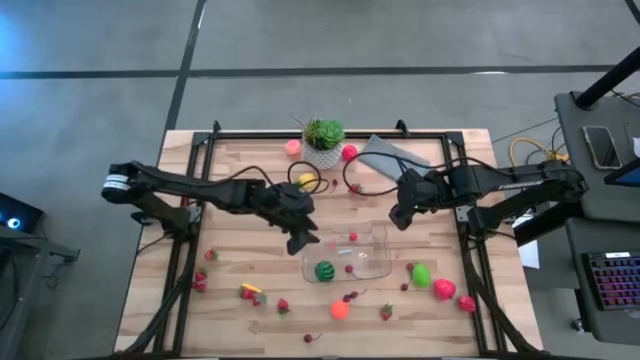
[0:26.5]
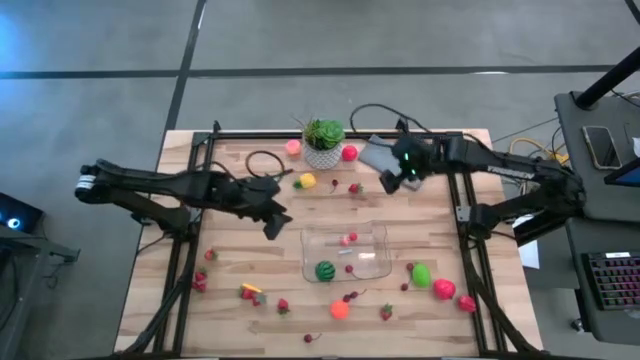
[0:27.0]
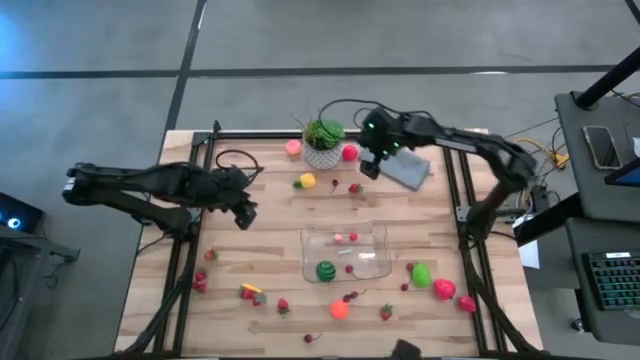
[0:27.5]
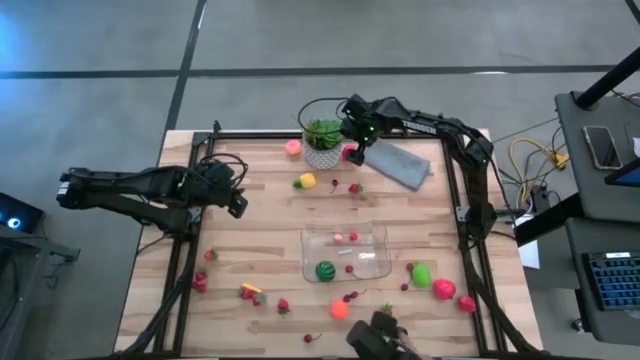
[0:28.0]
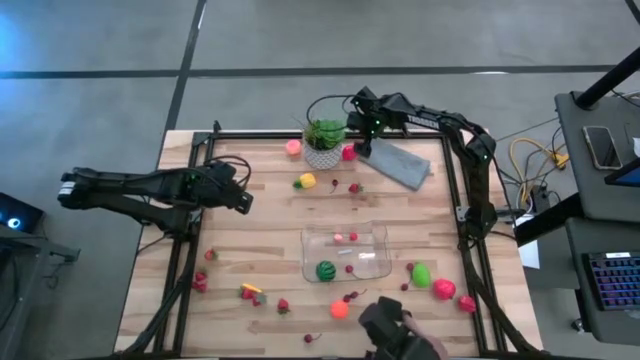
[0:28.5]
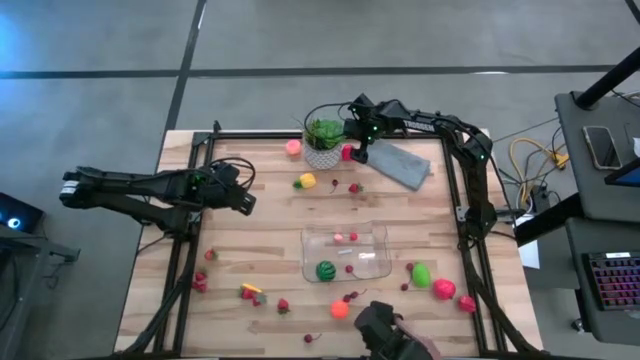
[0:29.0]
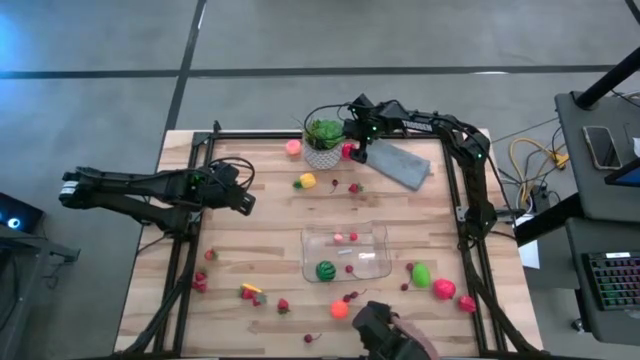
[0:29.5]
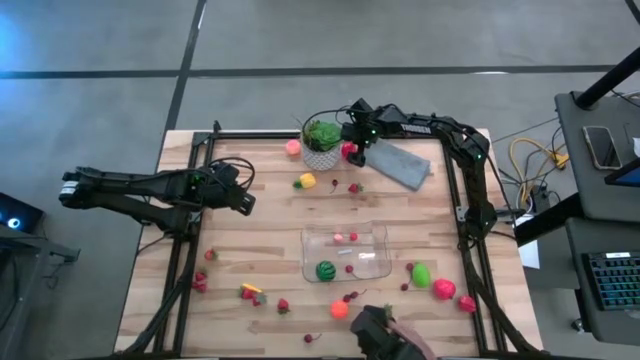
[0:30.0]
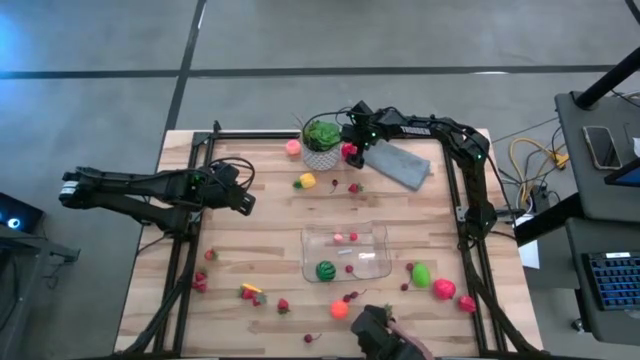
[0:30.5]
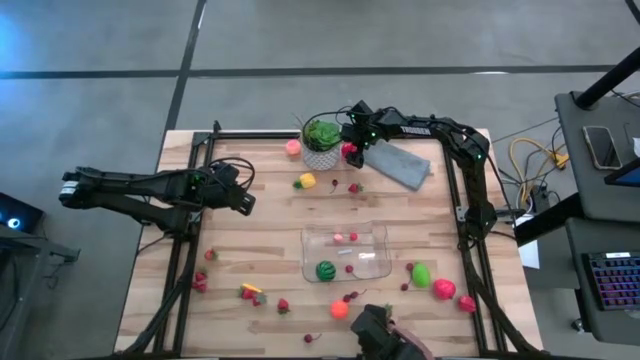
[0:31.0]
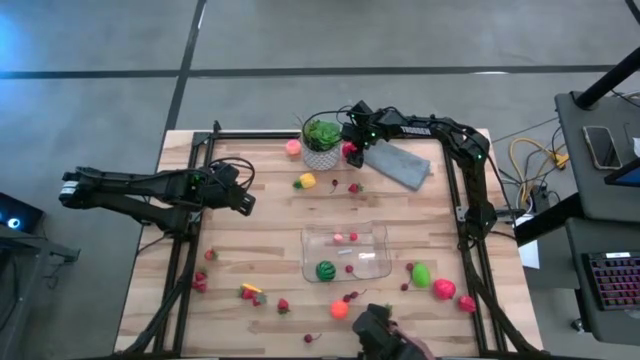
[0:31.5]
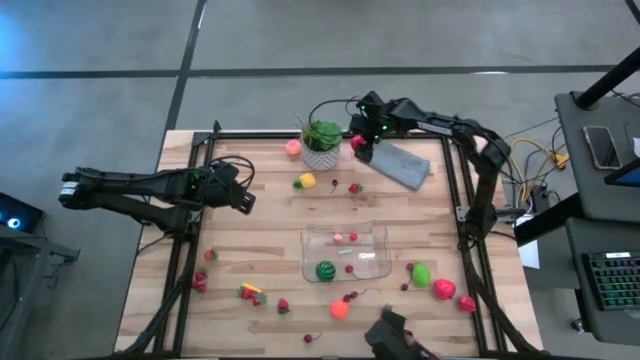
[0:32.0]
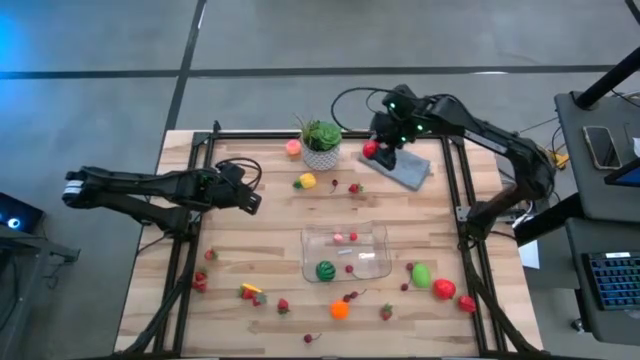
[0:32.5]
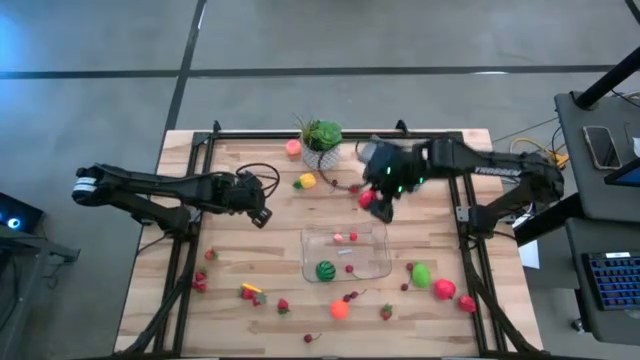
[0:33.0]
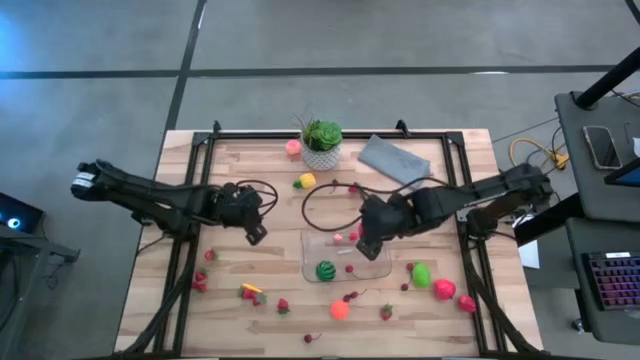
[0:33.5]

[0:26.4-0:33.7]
Task: Pick and placing Produce into tupperware
Put the tomato into the transparent bin

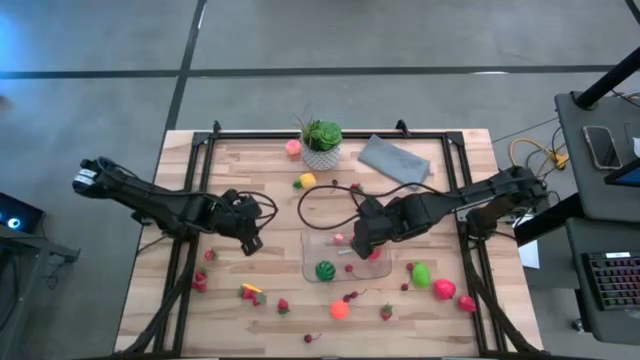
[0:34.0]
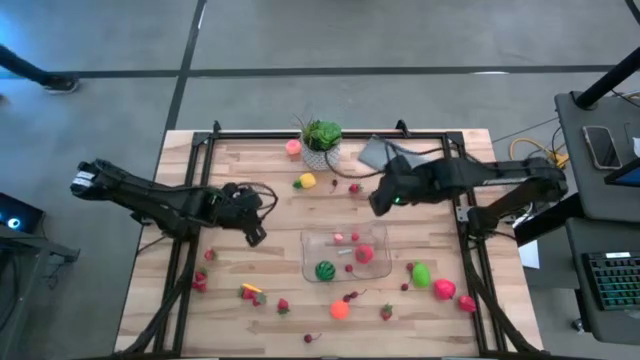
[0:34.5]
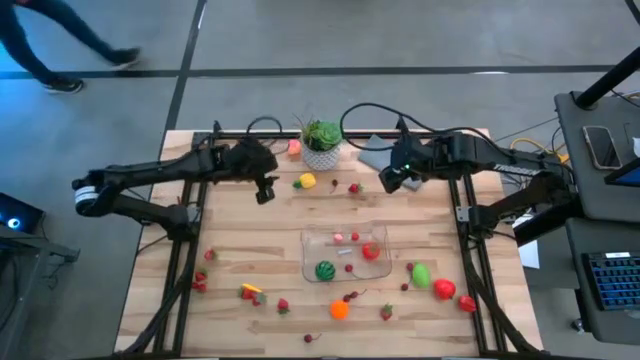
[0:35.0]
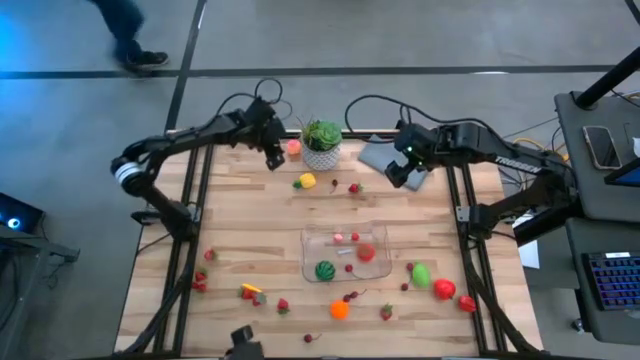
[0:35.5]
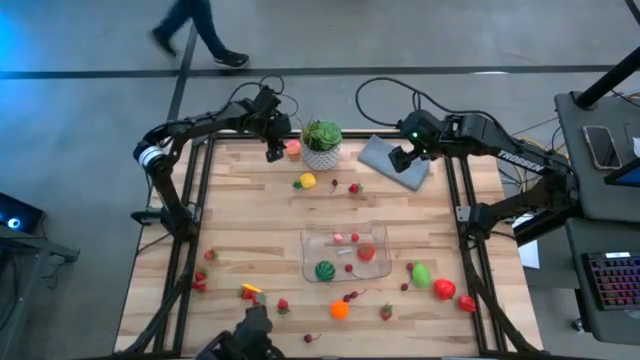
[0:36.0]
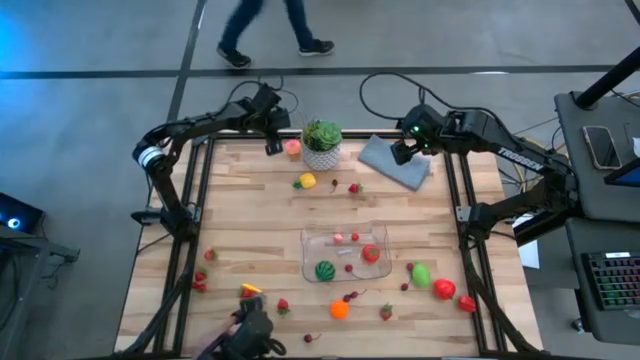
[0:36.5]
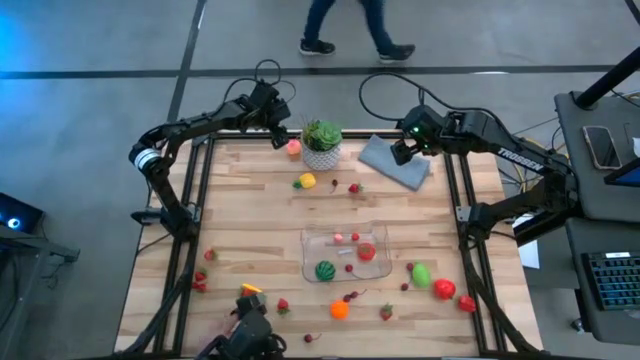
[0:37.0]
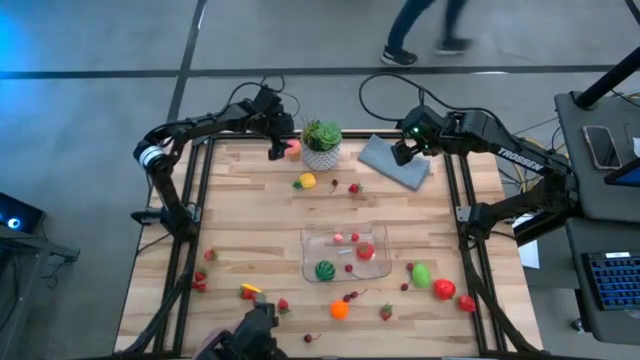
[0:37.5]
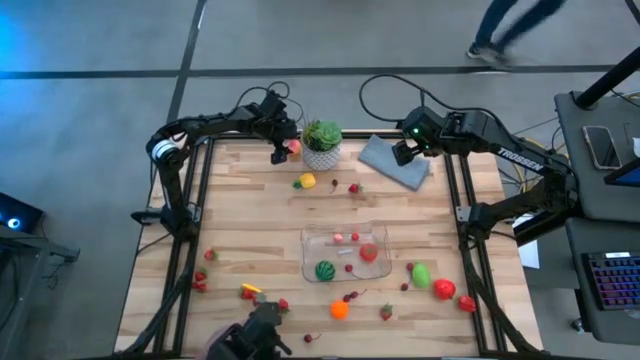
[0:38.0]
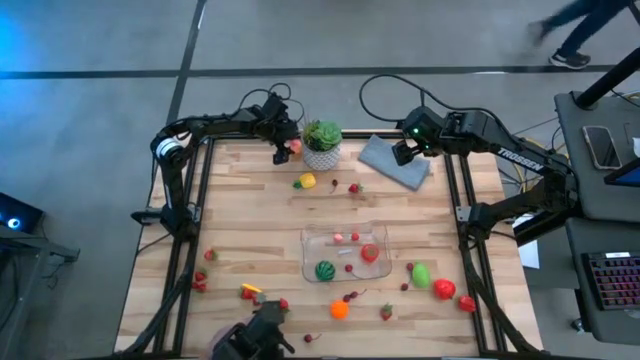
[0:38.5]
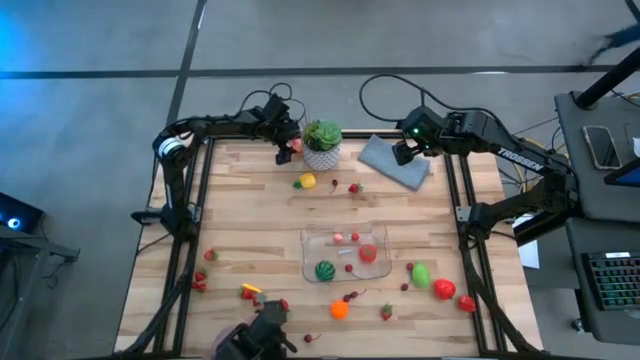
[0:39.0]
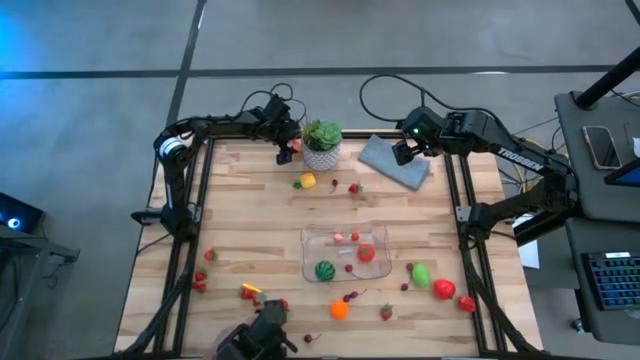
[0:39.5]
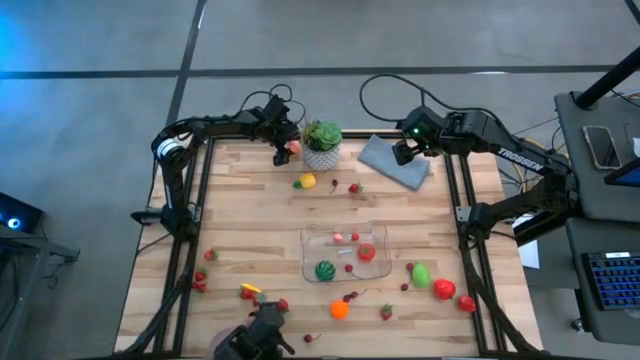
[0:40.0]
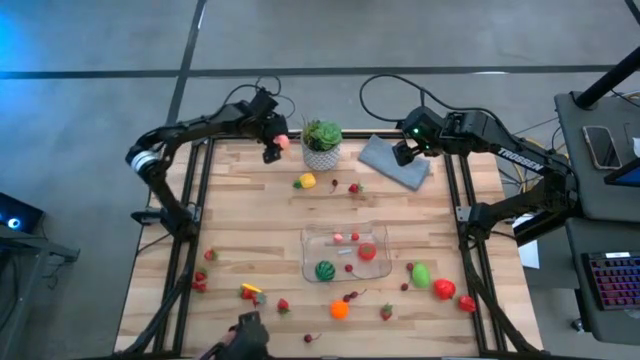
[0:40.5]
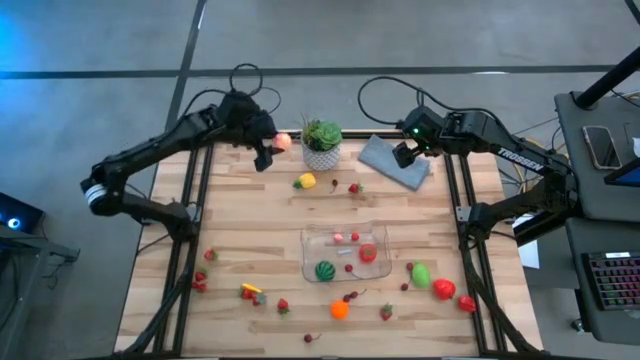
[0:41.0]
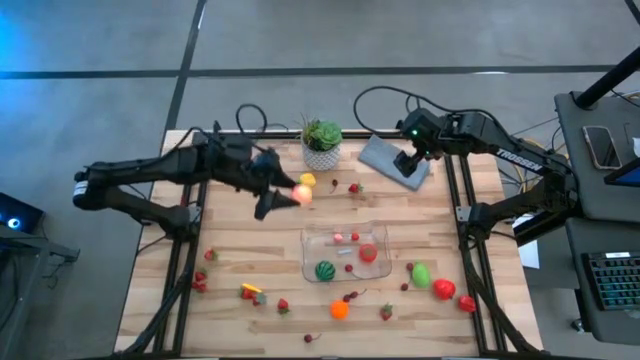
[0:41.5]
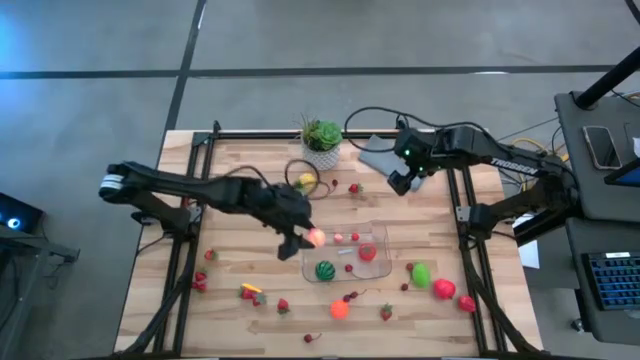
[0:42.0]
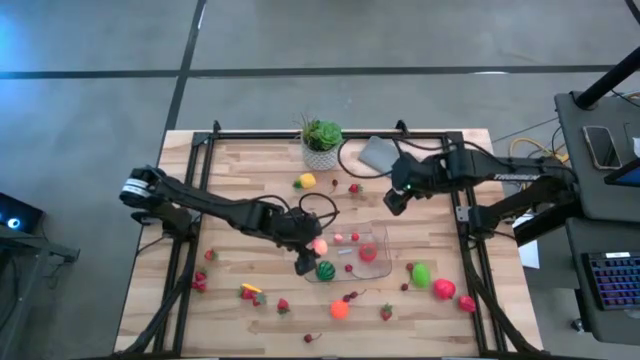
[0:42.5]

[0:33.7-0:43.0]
Put the peach into the transparent bin

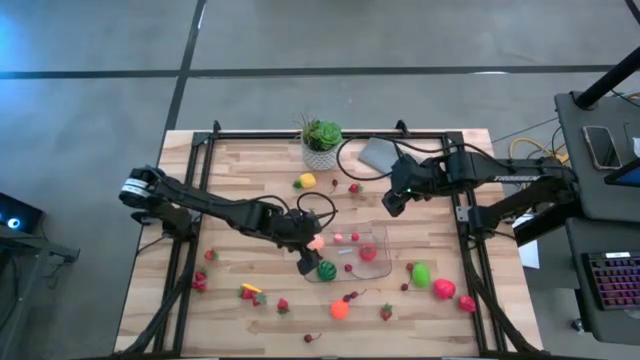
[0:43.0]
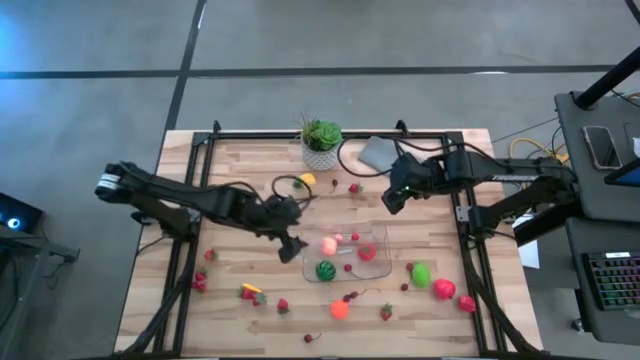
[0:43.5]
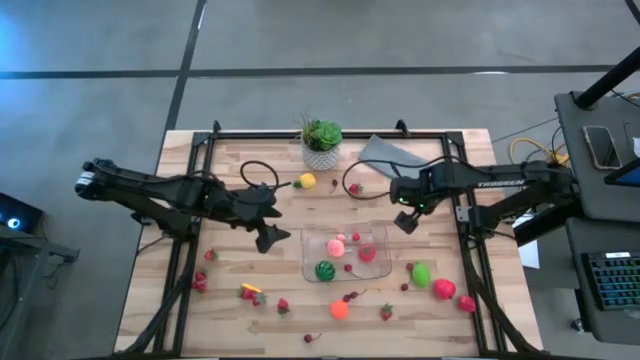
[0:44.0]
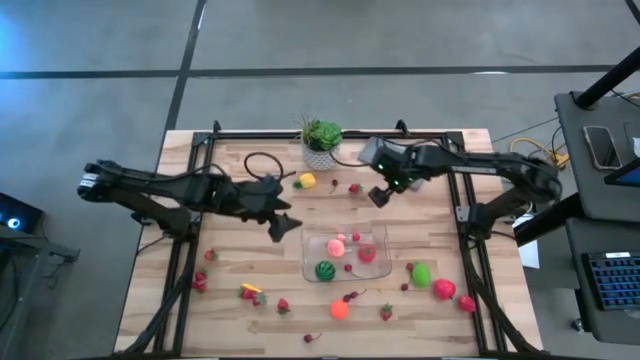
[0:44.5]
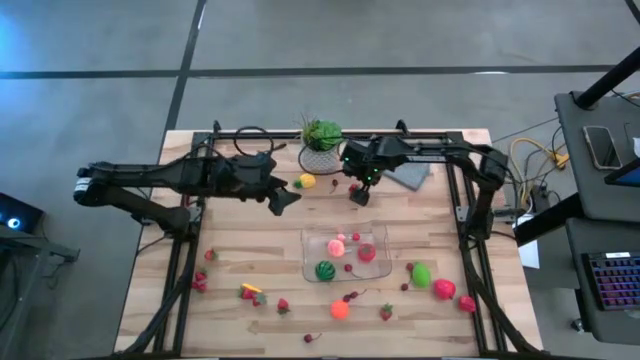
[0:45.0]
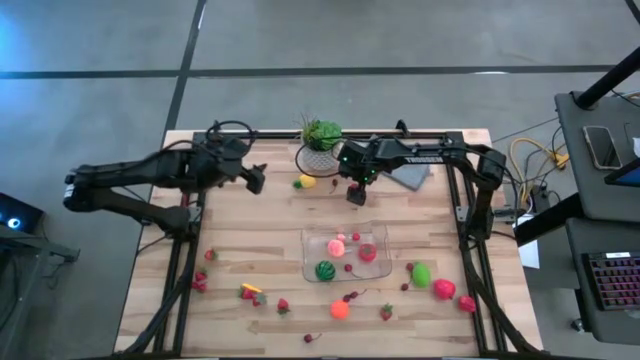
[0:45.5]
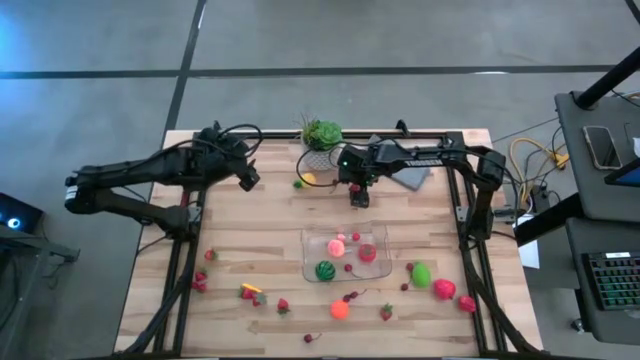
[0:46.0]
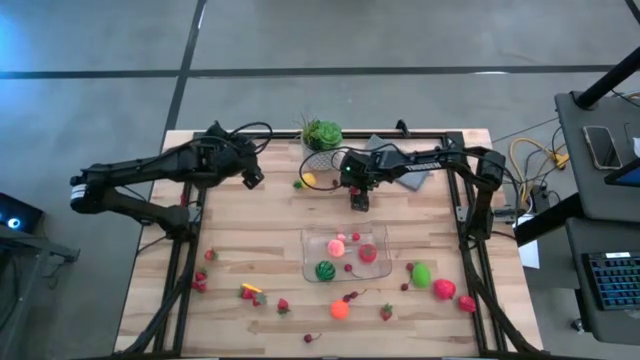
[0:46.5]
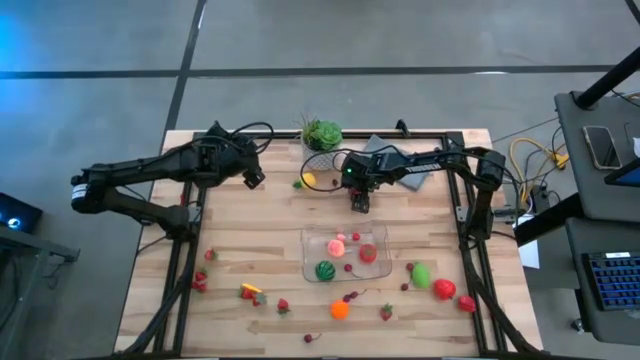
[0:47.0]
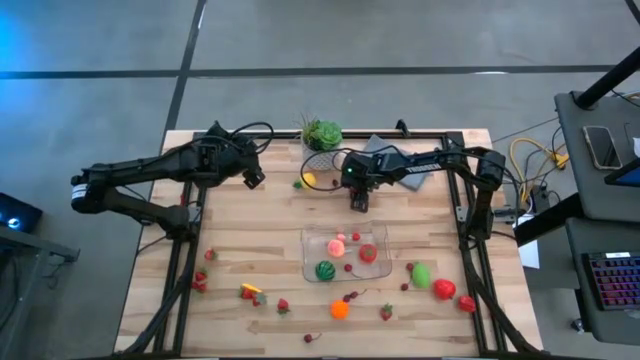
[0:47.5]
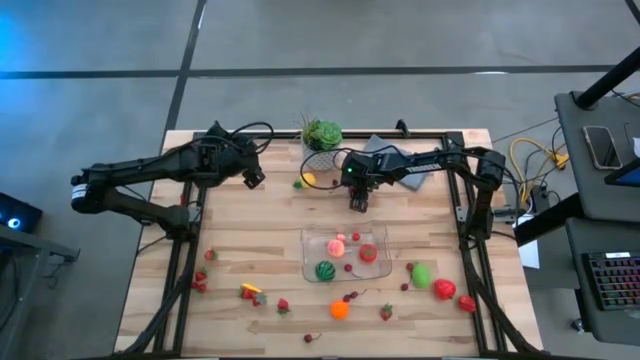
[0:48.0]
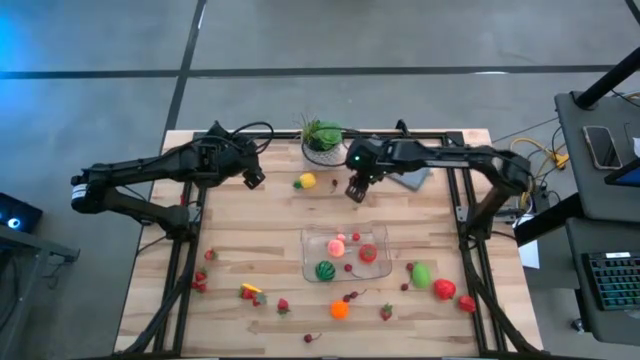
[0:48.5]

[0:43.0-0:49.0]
Put the strawberry into the transparent bin
